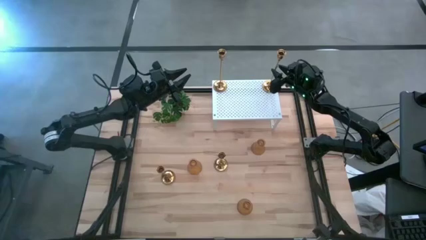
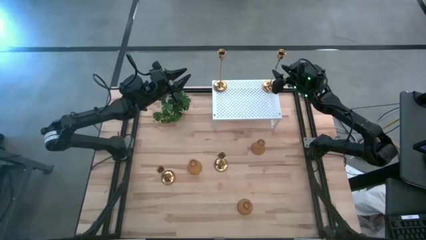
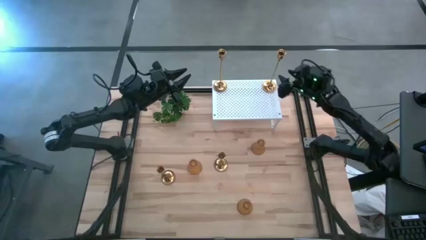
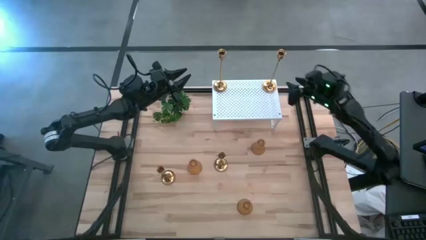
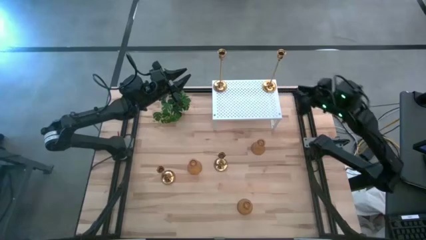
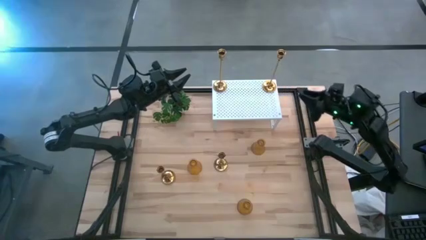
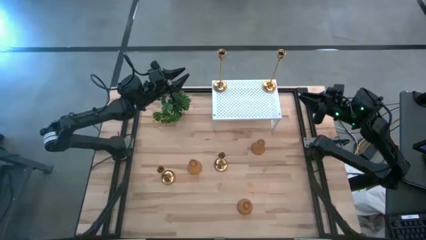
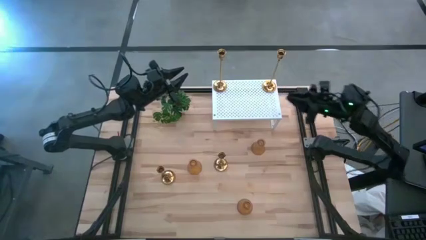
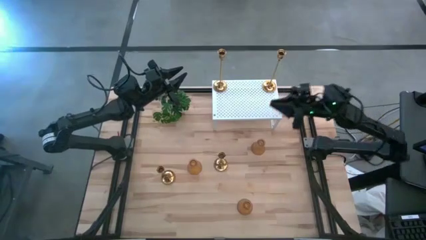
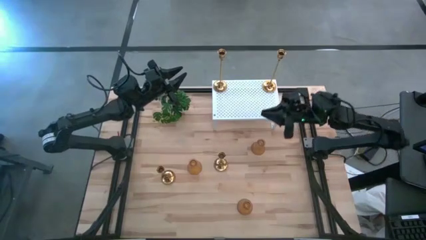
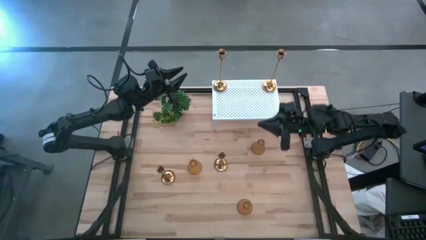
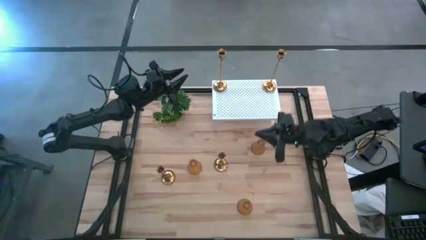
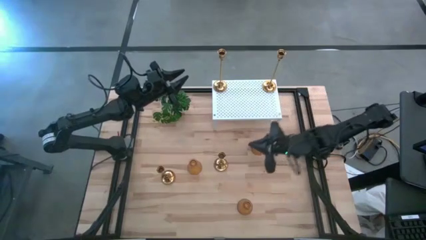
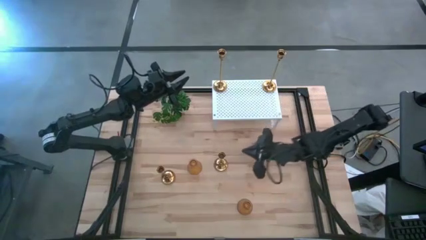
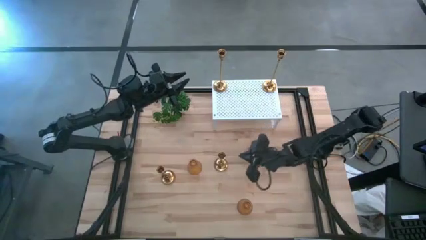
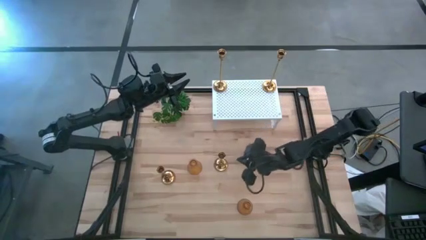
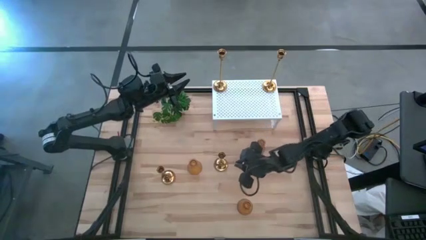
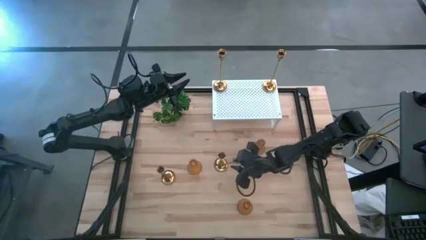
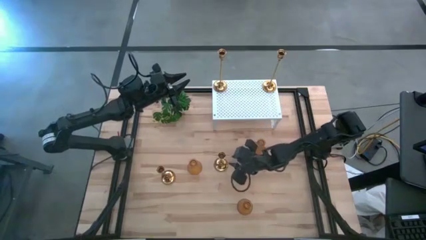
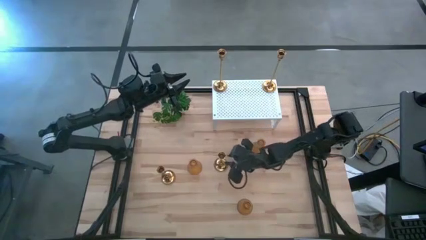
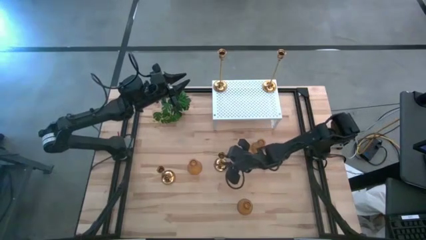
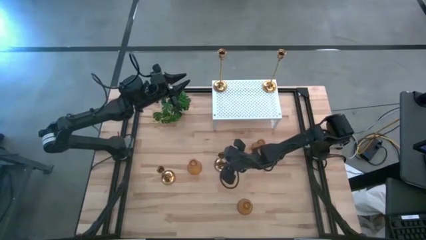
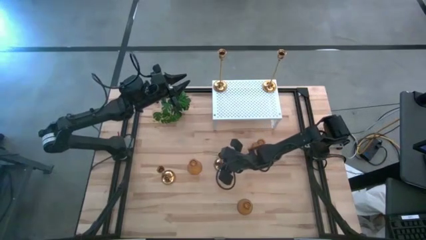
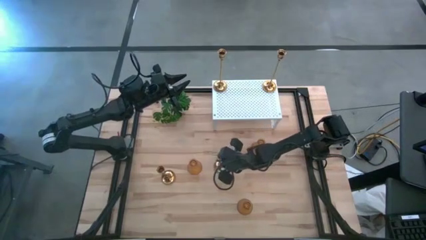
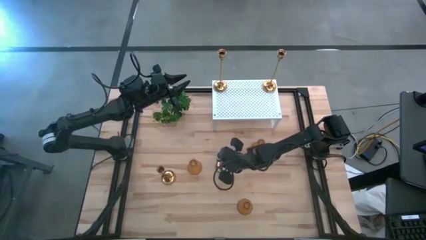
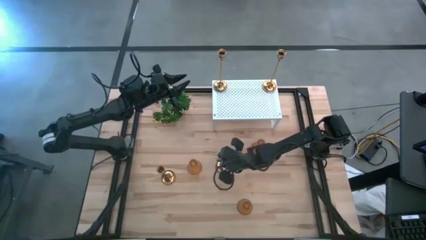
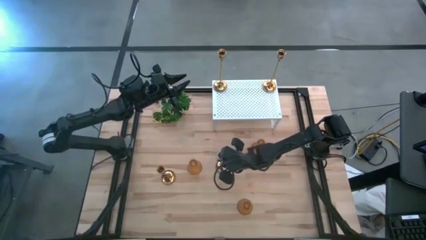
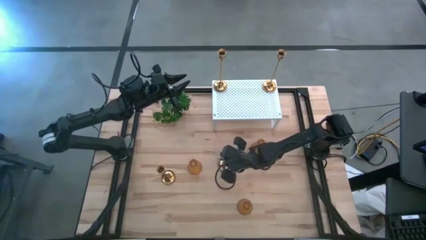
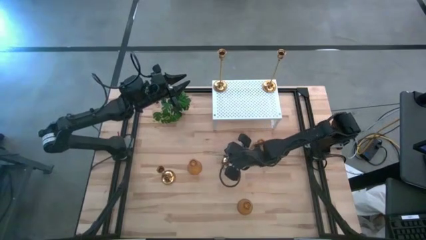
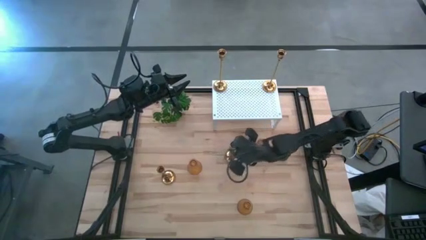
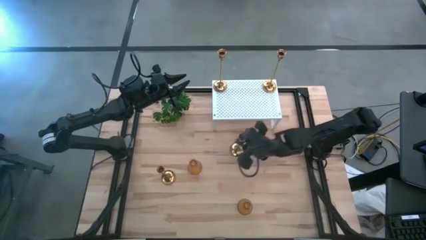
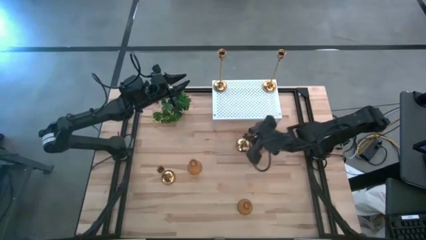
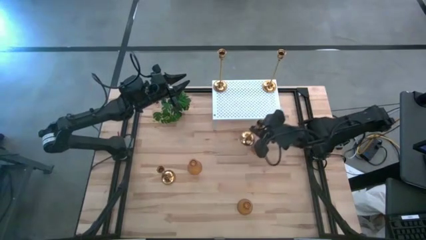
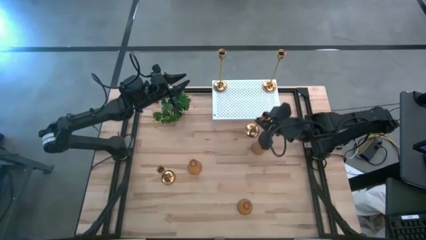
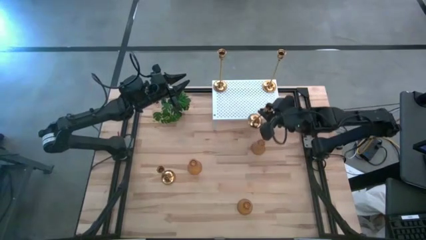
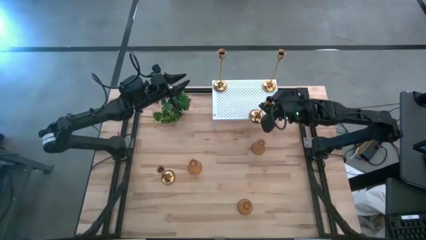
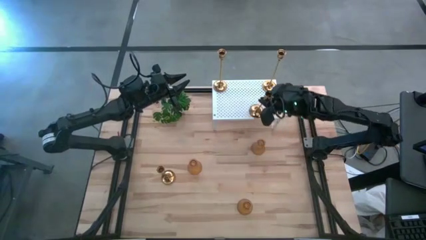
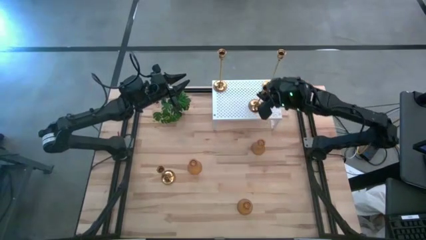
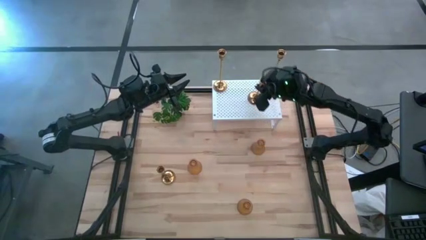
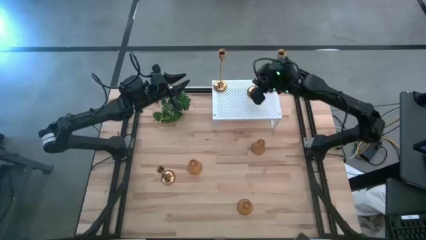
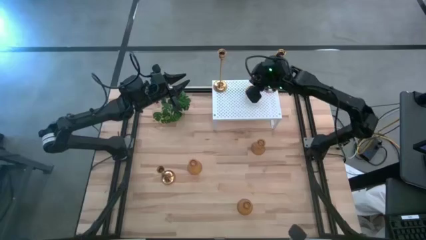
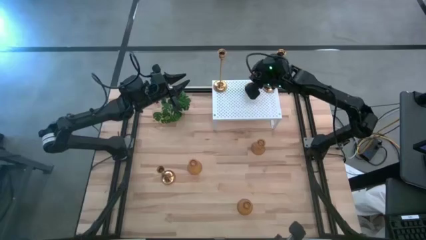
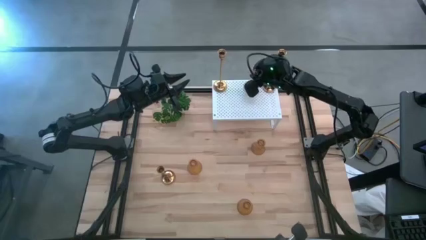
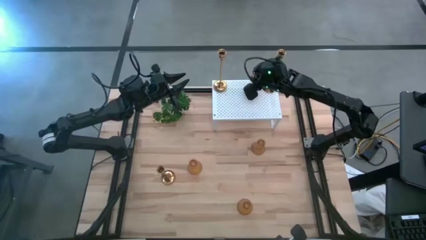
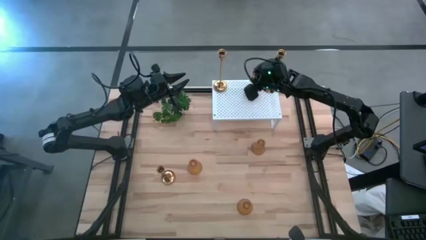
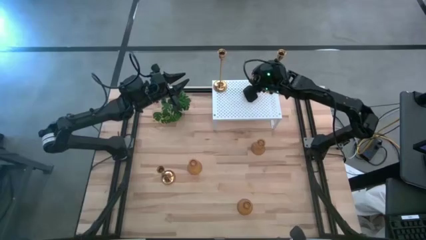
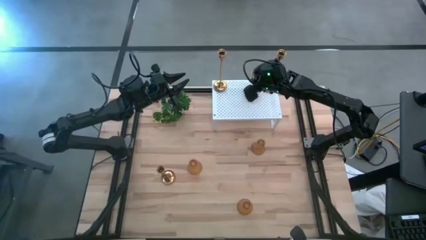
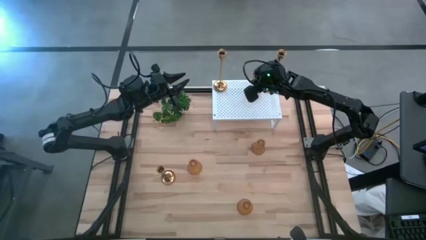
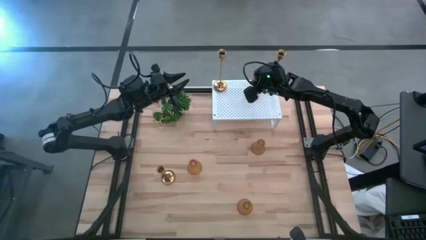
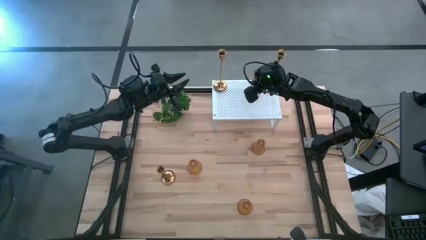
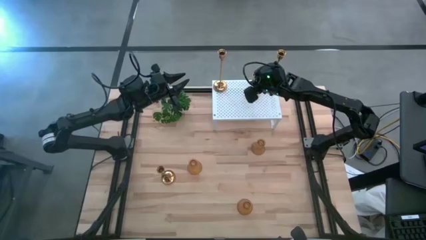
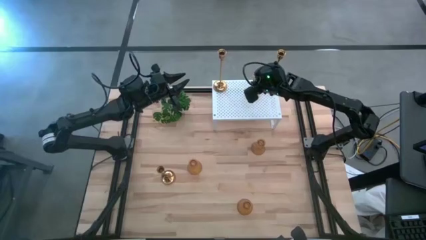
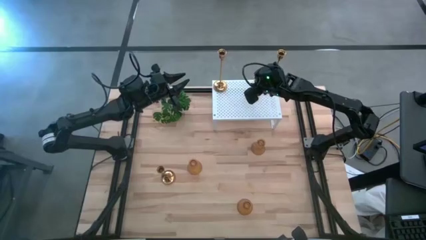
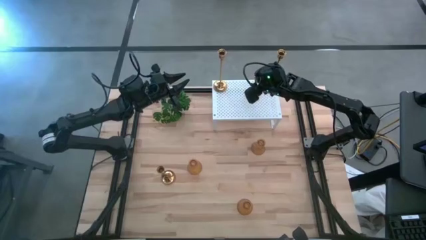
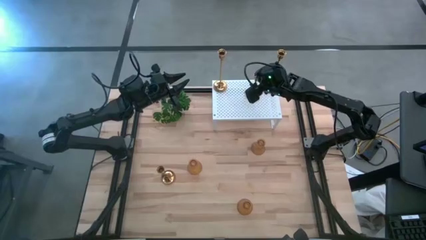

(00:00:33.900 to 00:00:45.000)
Task: Pick & Place candle stick holders
Put the right gold candle holder on the shelf

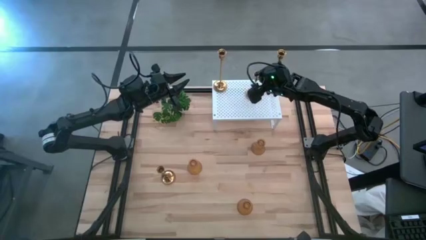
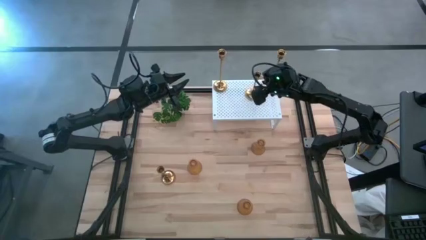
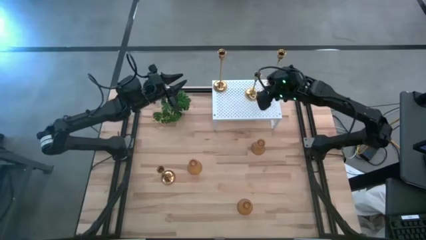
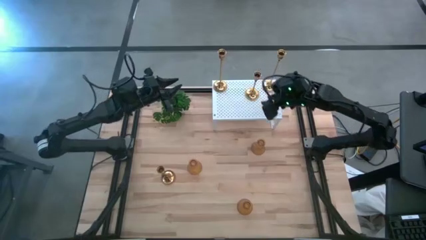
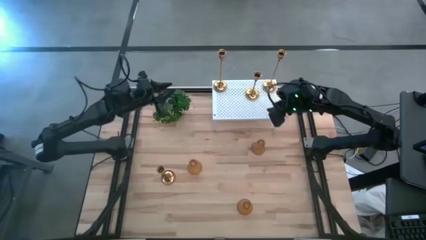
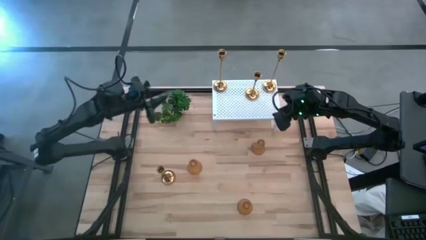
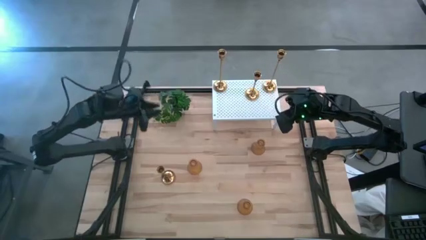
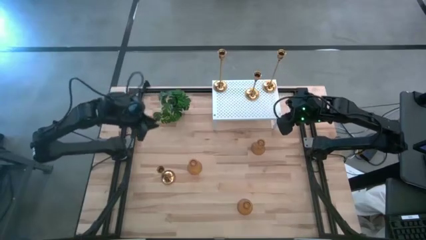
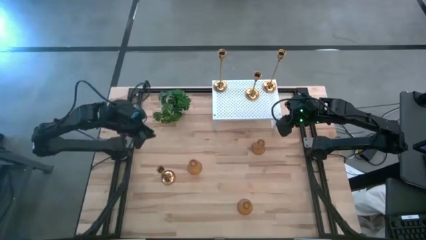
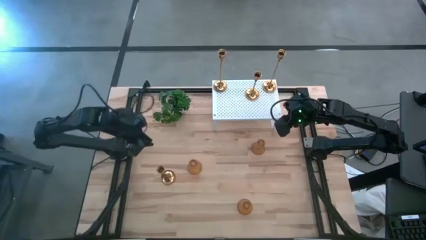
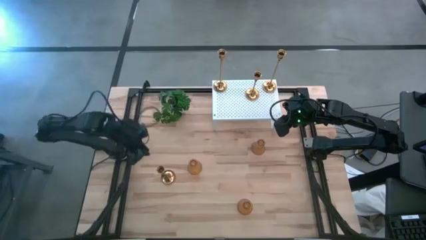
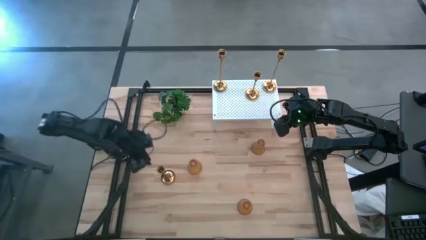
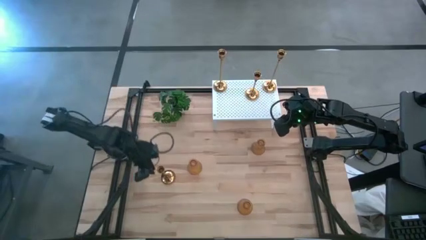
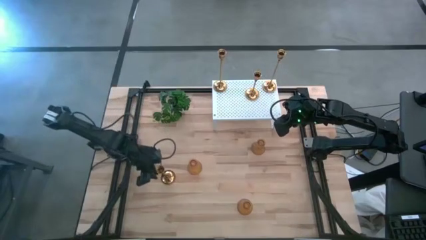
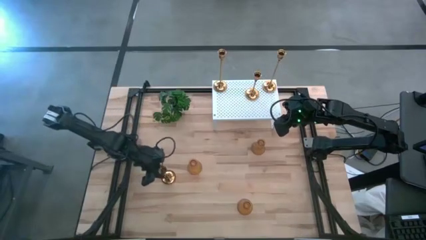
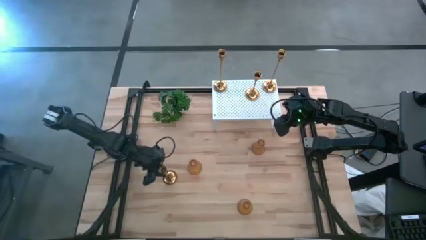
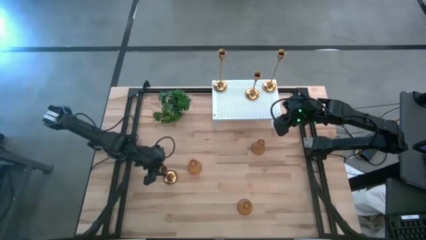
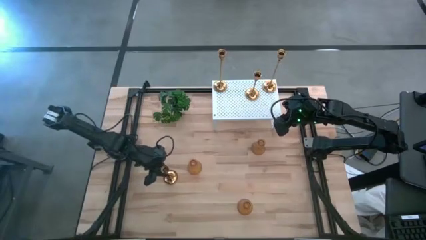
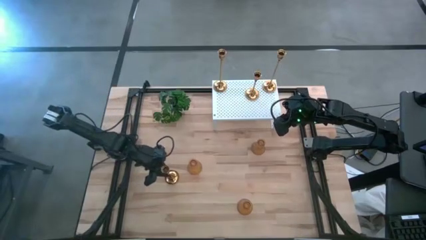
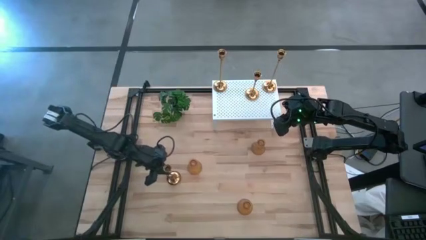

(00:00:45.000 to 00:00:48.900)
Put the gold candle holder on the shelf
